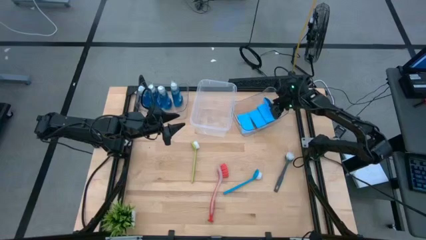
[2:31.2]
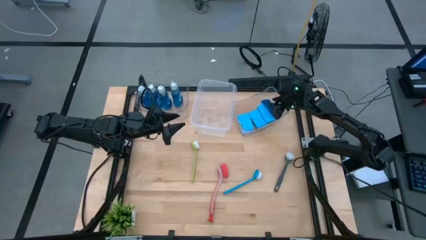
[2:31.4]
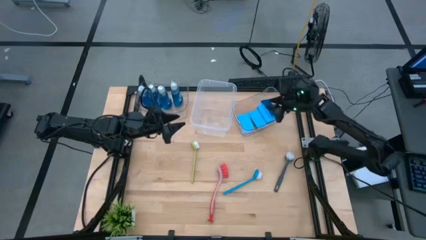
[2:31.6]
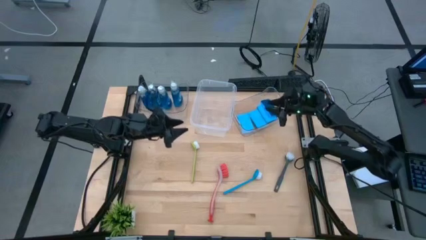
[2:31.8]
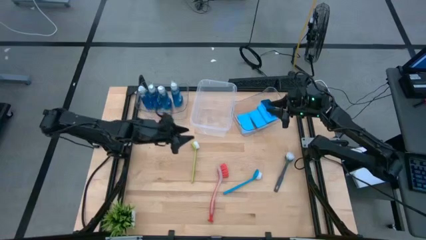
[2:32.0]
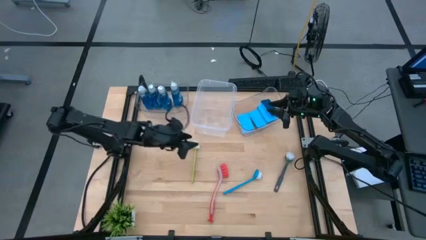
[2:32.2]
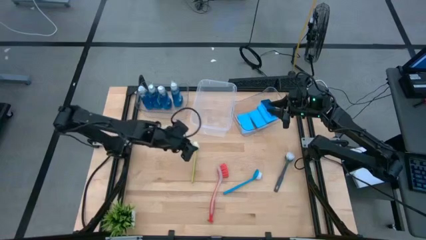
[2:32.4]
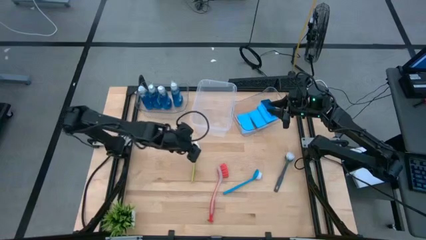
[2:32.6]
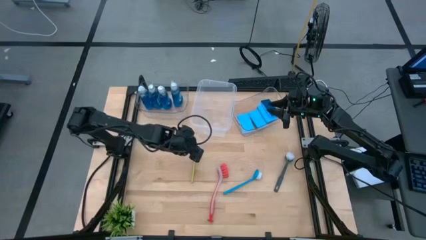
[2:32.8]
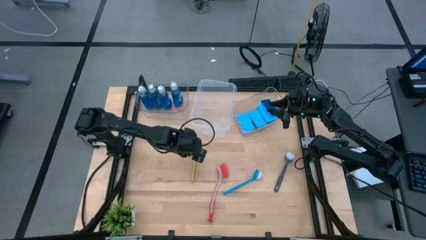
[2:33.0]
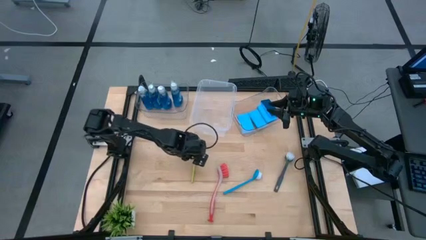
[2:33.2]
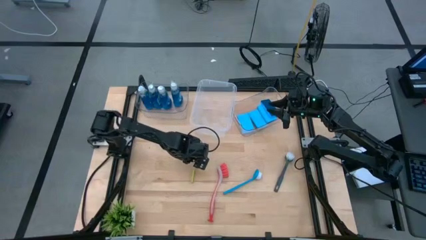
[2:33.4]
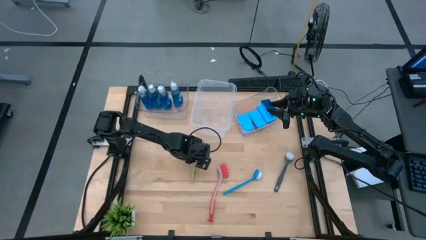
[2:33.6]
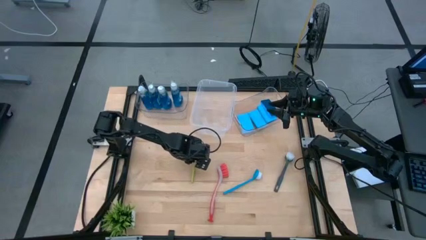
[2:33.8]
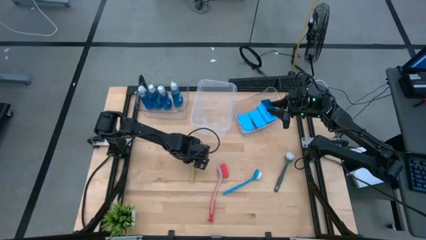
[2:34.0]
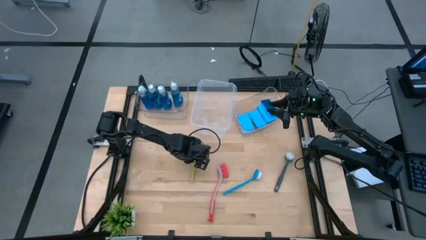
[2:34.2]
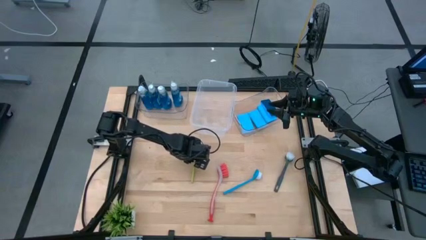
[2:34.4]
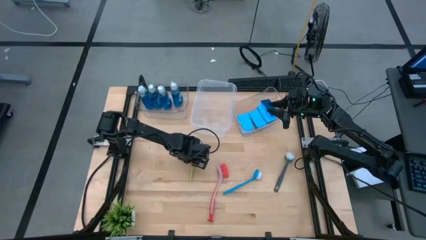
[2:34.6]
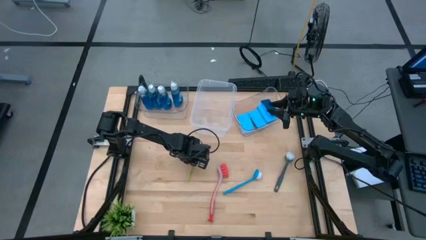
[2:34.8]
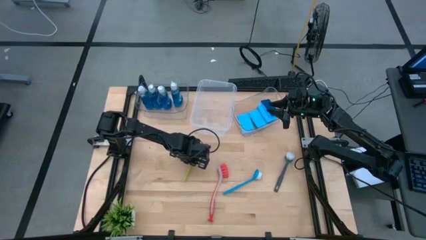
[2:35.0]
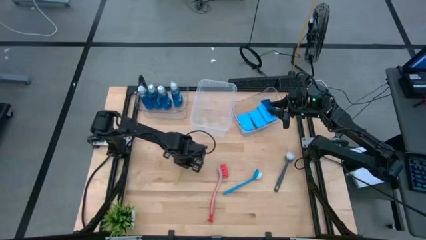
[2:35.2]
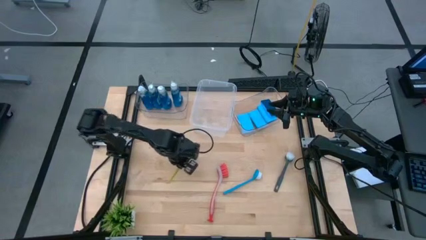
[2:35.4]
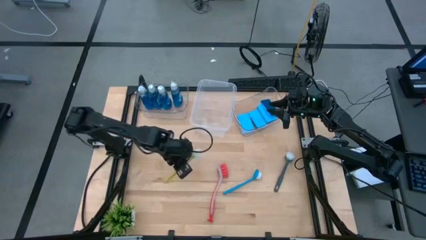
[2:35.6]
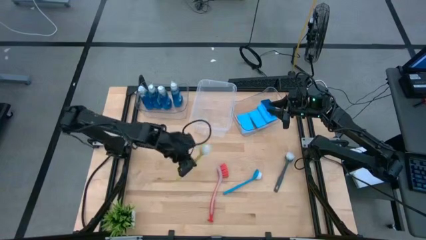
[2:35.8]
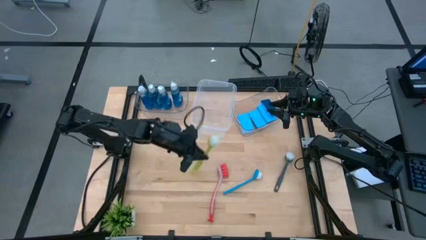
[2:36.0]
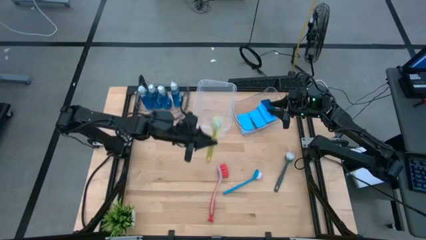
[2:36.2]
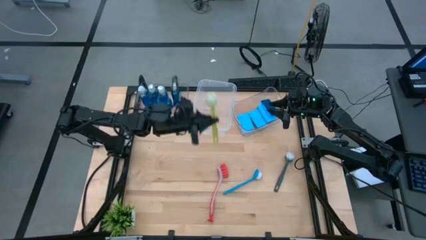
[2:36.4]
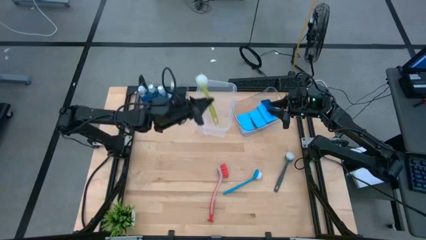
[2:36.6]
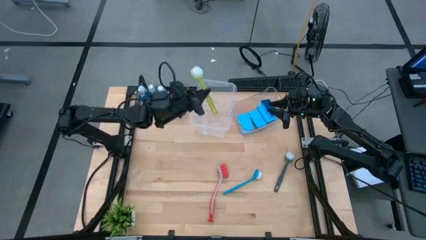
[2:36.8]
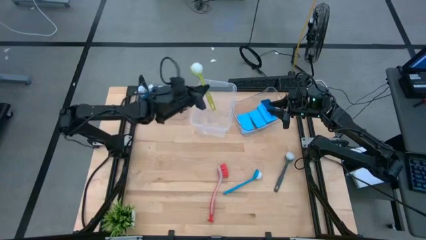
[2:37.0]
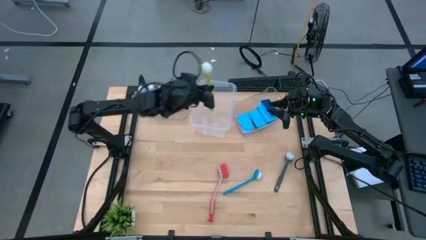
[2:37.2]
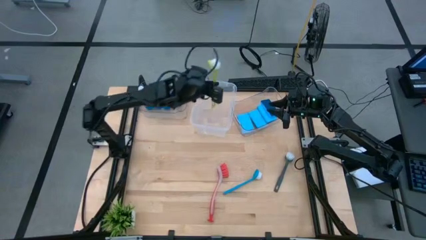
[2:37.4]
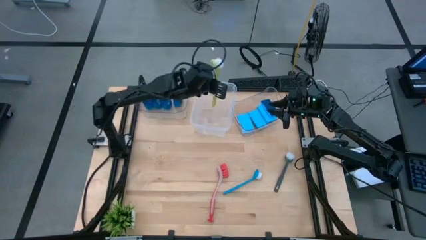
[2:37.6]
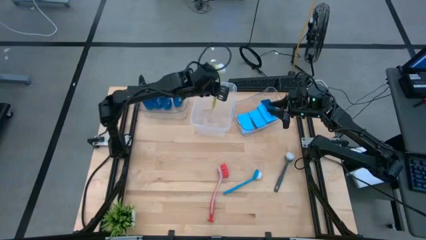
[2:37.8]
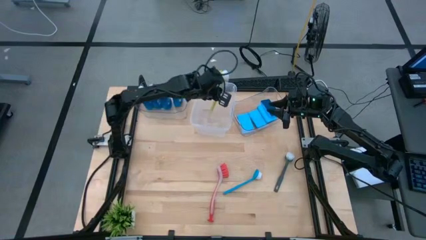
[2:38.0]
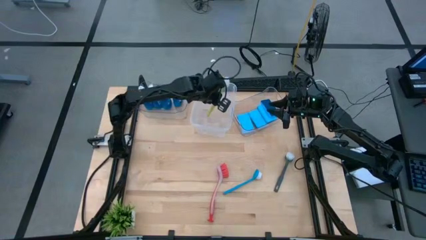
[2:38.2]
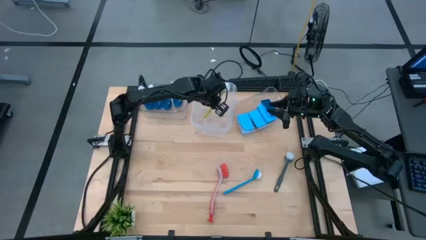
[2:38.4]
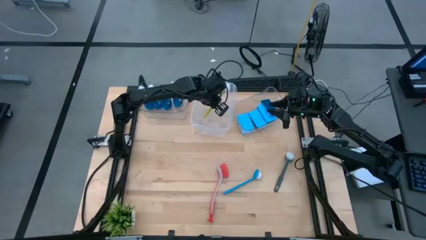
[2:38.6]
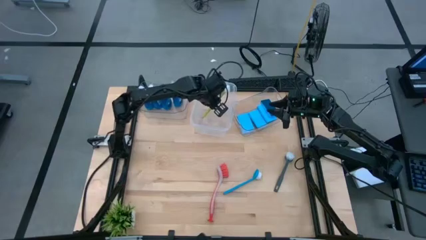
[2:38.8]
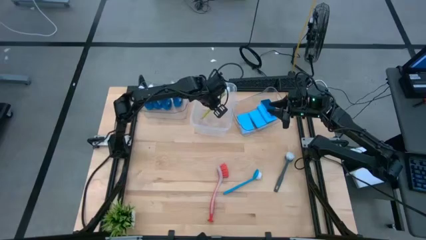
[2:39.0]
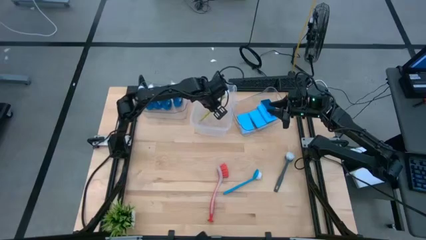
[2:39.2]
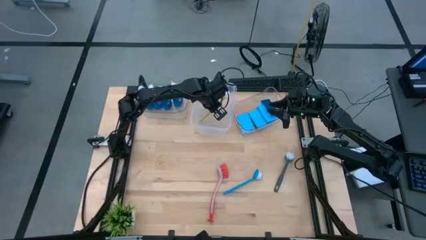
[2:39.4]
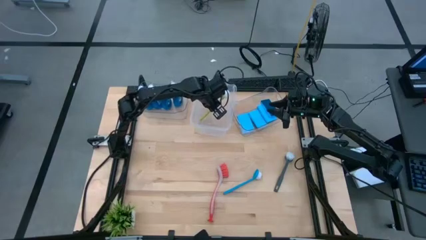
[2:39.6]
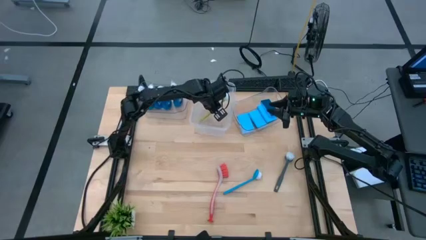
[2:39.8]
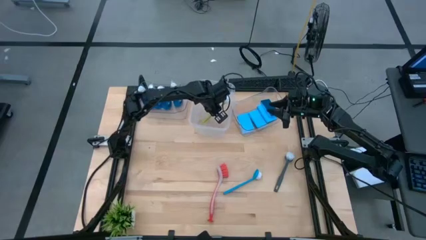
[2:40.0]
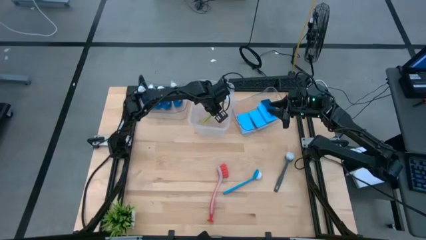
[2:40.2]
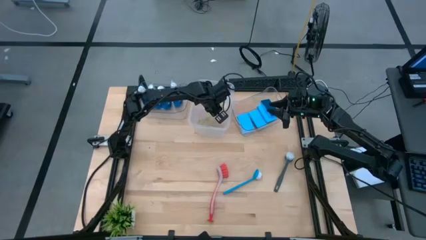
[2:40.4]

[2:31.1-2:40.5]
Task: Pick & Place Kitchen Sink Supplies
Put the green dish brush into the large transparent bin

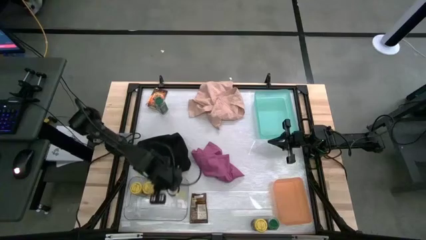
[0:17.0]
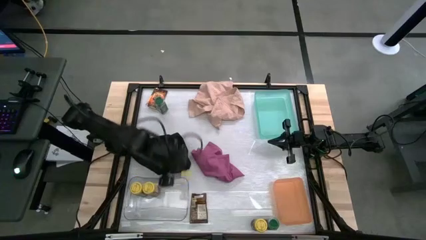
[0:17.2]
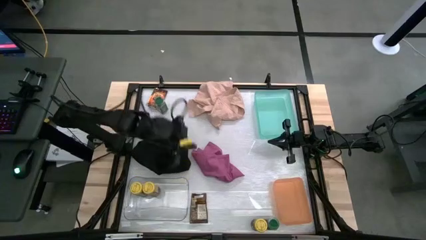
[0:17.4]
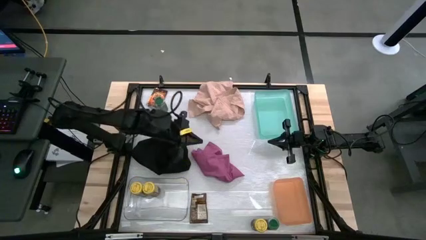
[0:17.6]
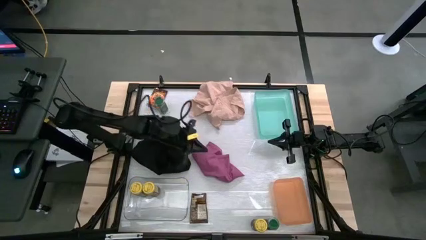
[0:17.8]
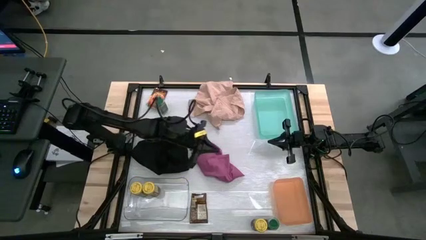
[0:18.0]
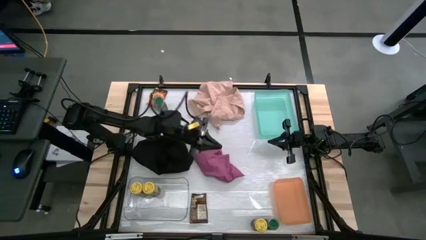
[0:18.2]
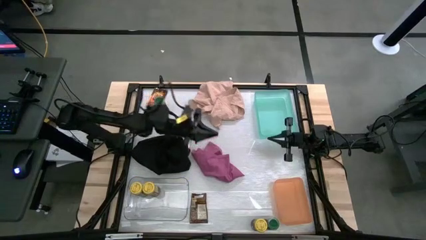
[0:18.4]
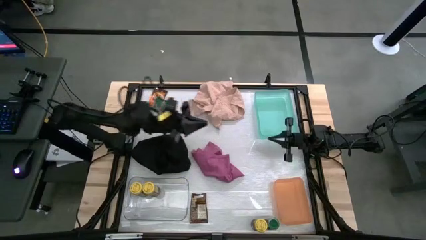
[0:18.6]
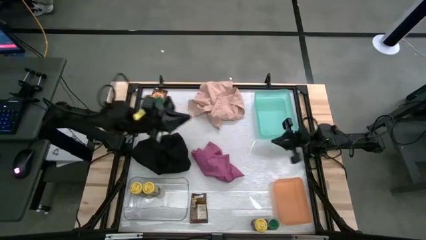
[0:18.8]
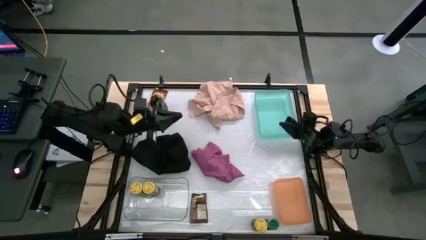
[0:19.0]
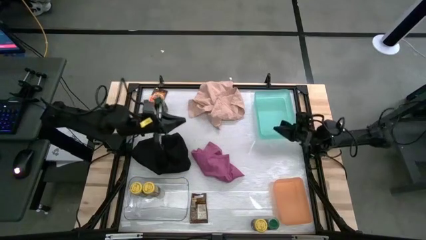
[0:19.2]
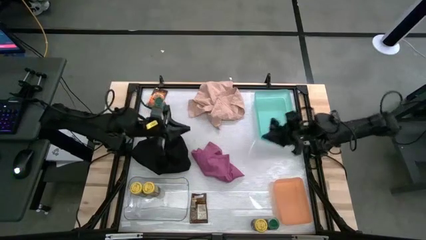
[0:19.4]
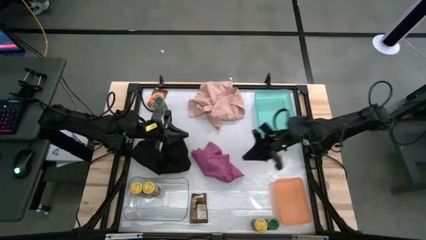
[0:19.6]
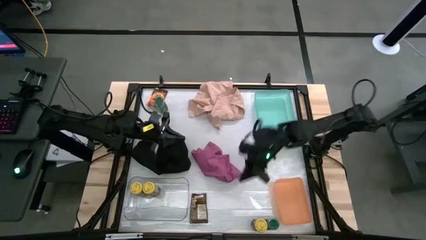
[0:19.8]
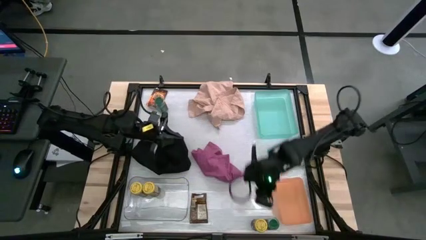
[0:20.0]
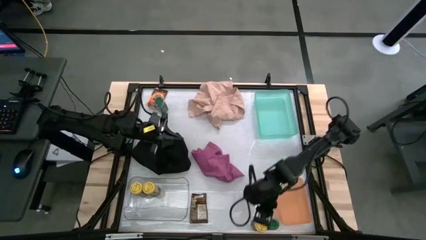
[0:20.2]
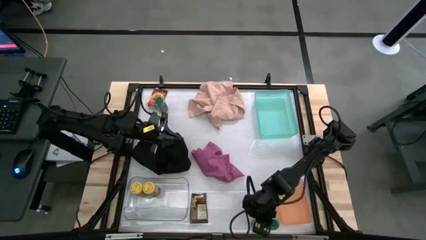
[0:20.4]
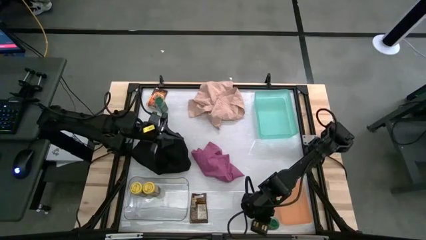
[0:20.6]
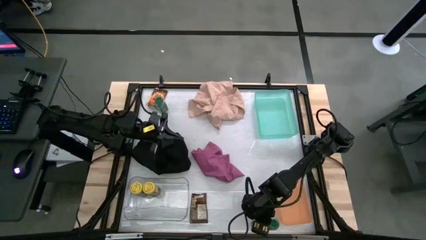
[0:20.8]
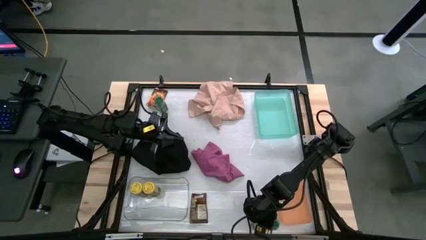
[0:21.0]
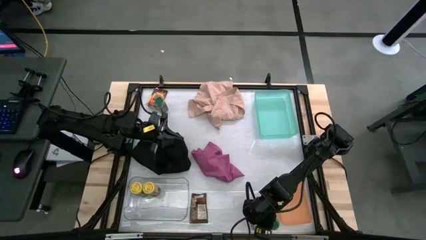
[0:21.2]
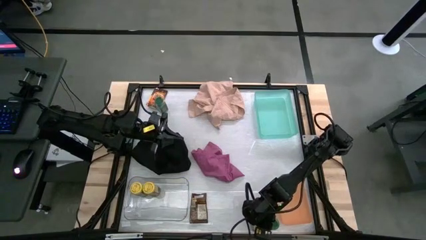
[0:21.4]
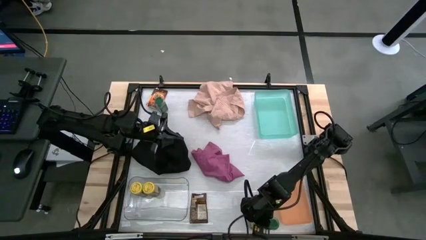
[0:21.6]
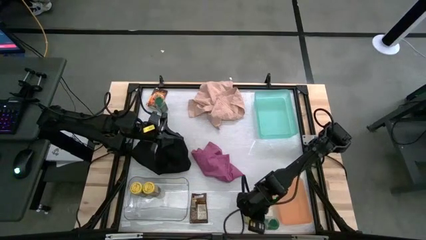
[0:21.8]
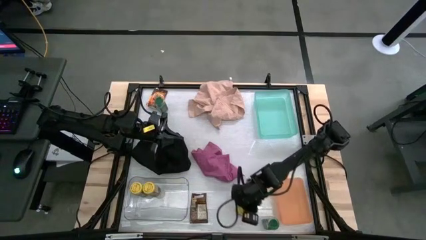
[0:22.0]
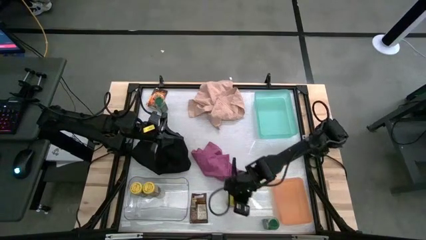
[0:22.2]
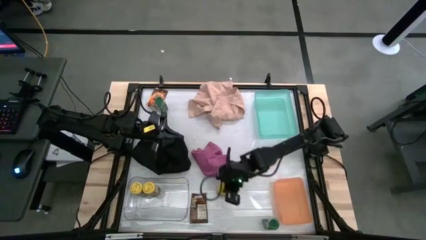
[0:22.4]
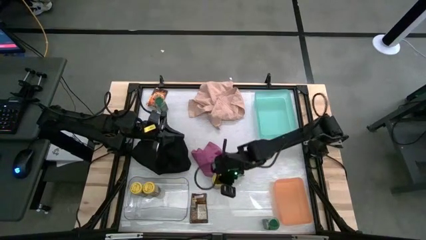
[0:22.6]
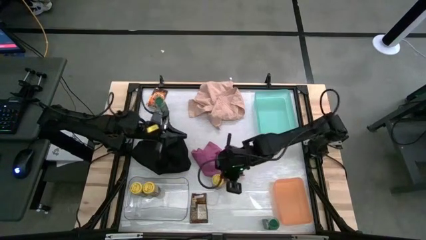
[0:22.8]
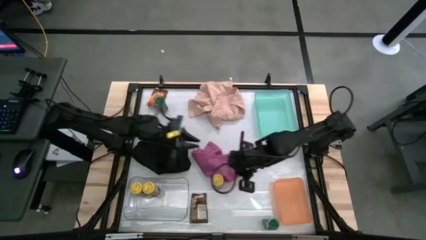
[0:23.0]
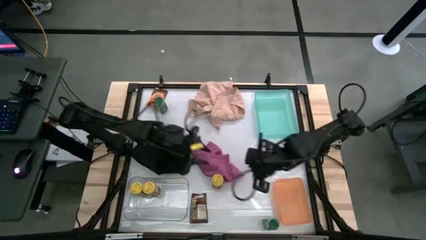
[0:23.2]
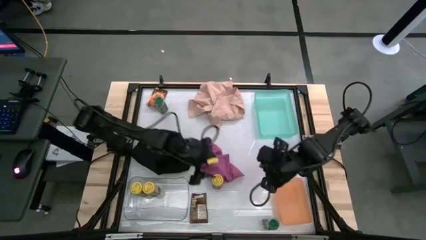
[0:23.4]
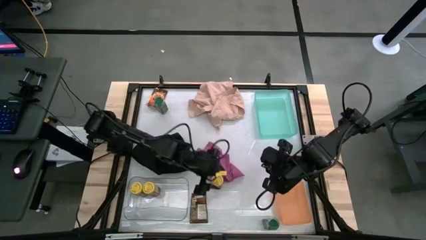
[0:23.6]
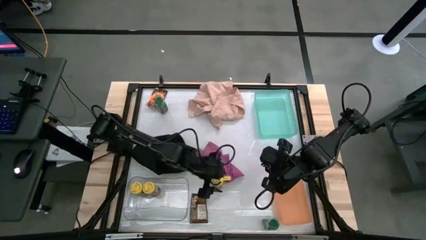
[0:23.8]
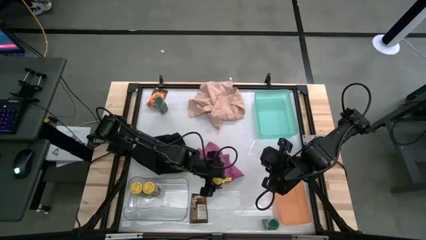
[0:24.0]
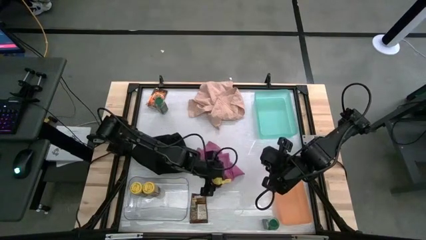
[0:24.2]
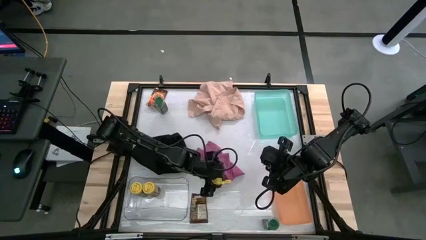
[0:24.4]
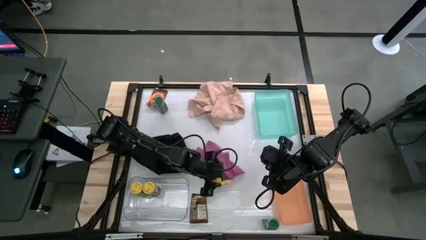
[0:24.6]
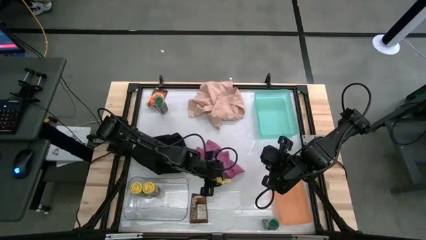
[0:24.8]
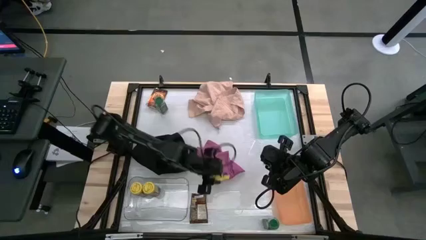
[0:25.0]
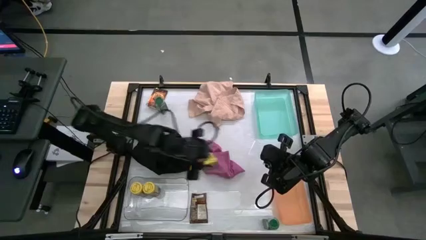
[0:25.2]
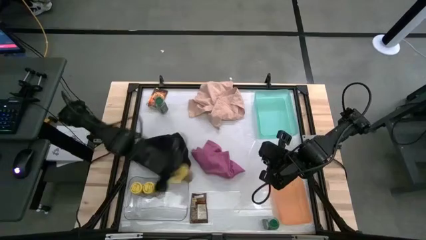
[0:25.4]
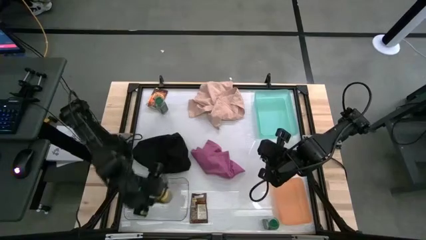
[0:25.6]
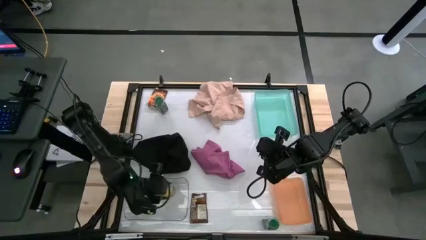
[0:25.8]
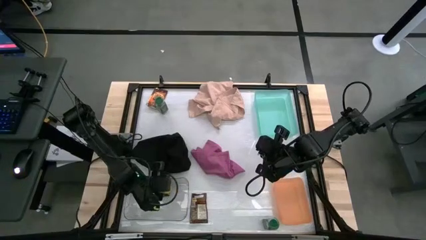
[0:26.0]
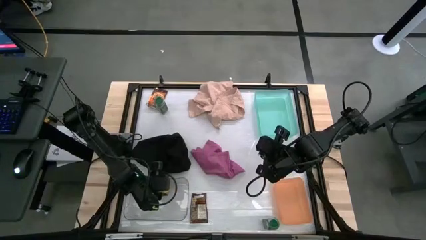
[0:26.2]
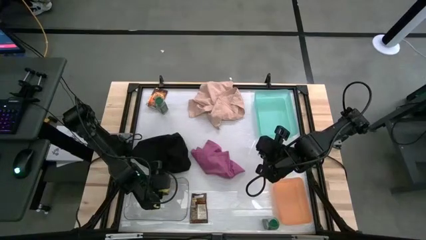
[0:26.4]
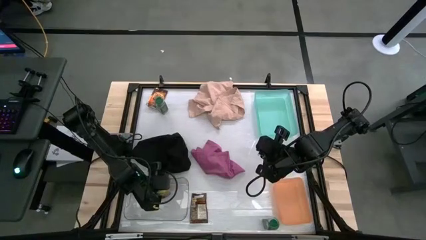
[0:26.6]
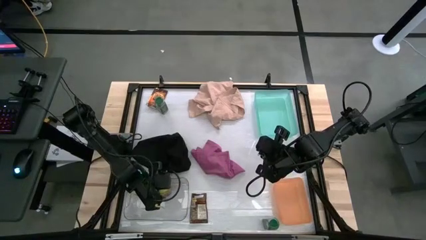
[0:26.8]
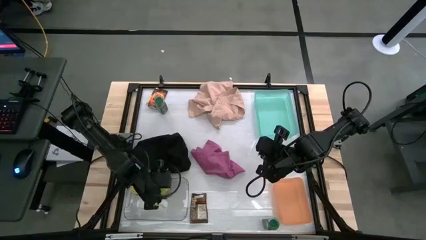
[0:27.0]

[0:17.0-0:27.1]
Task: Sort spices by type
Put the yellow seasoning bottle into the transparent bin
